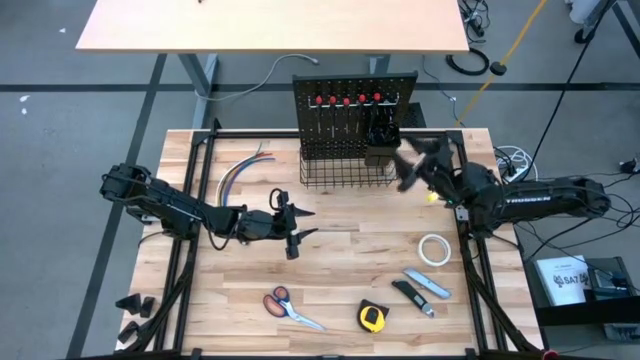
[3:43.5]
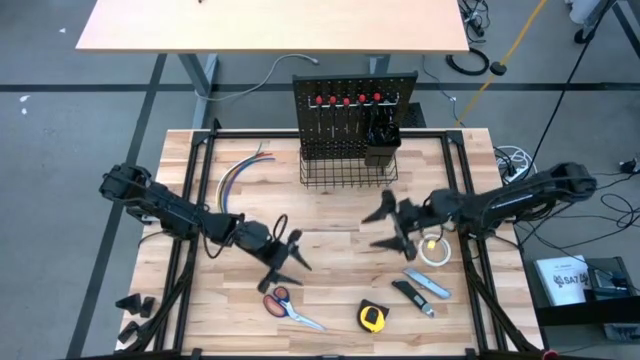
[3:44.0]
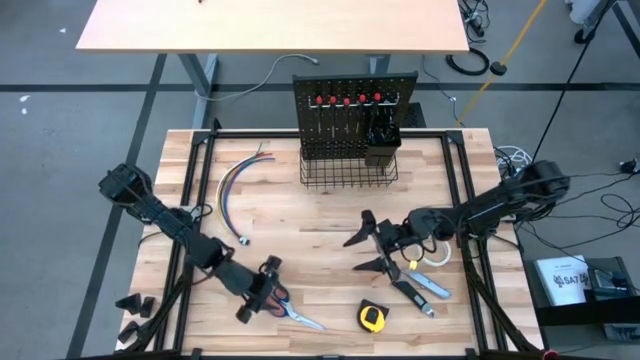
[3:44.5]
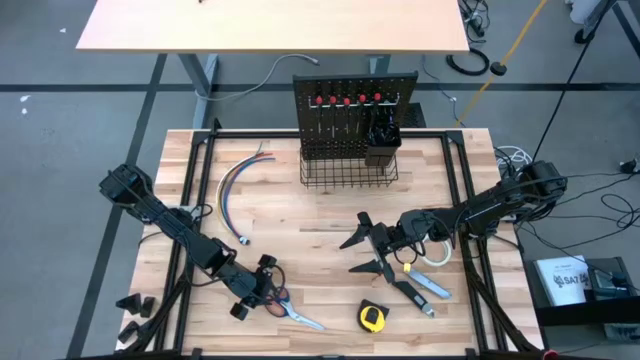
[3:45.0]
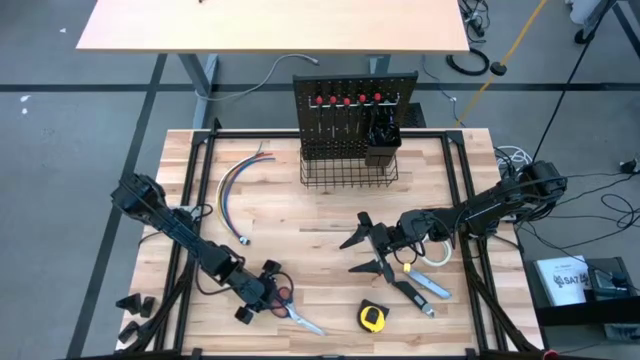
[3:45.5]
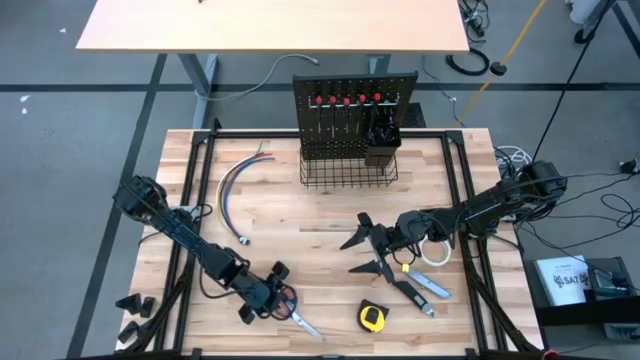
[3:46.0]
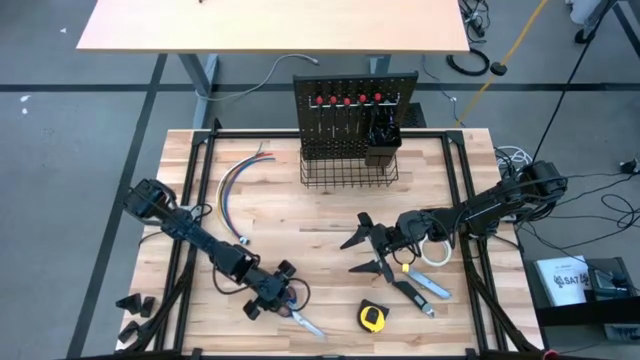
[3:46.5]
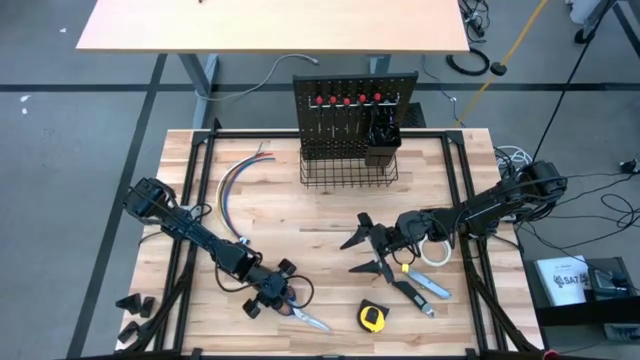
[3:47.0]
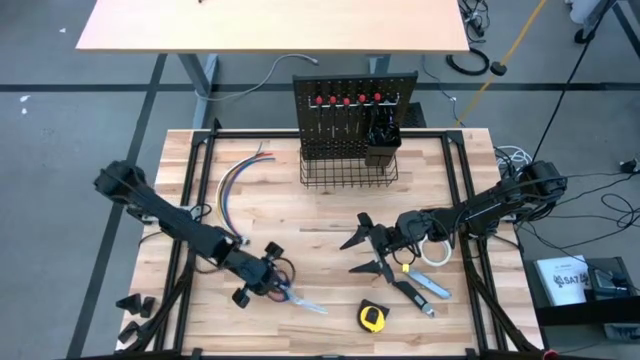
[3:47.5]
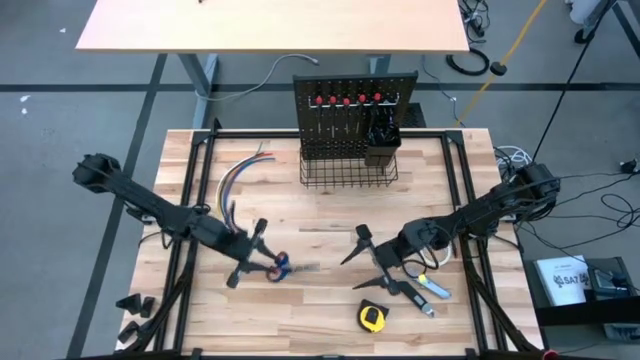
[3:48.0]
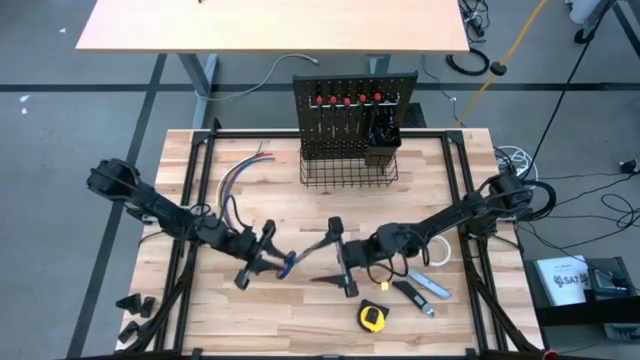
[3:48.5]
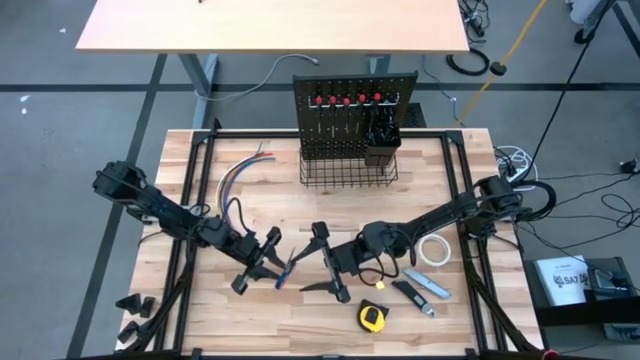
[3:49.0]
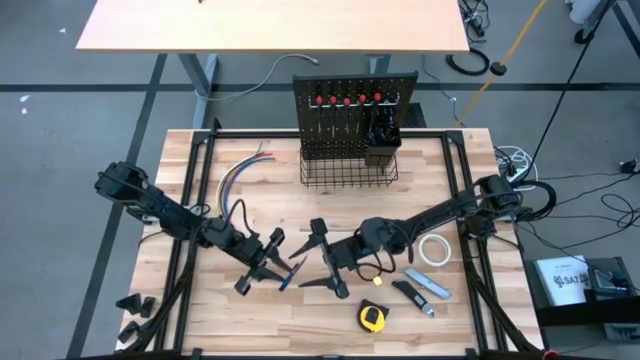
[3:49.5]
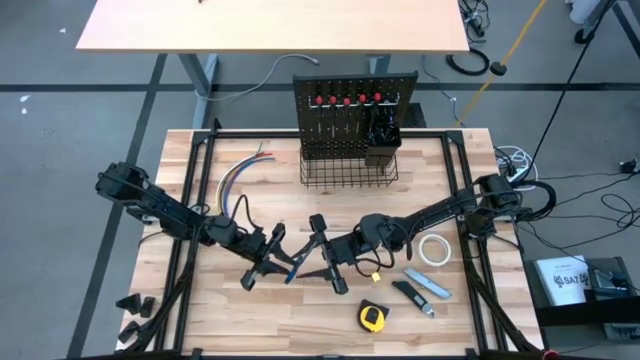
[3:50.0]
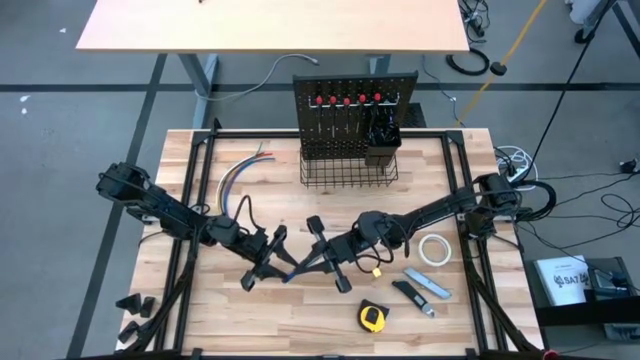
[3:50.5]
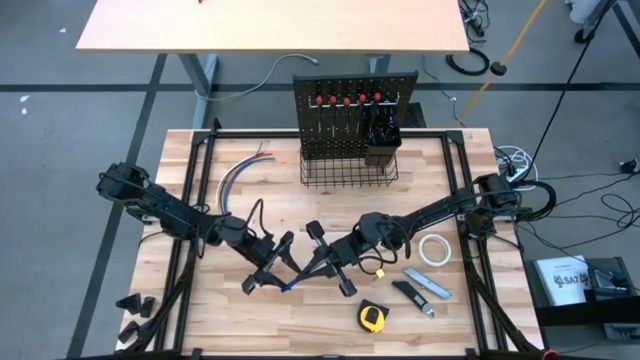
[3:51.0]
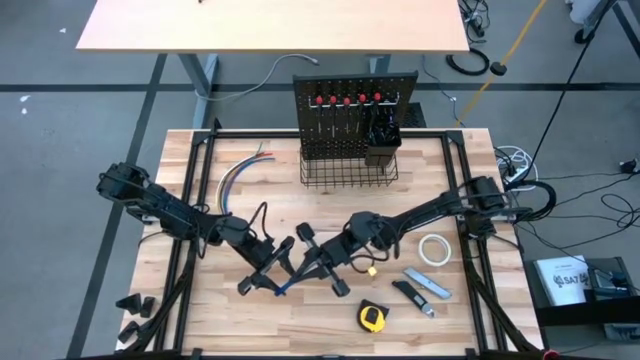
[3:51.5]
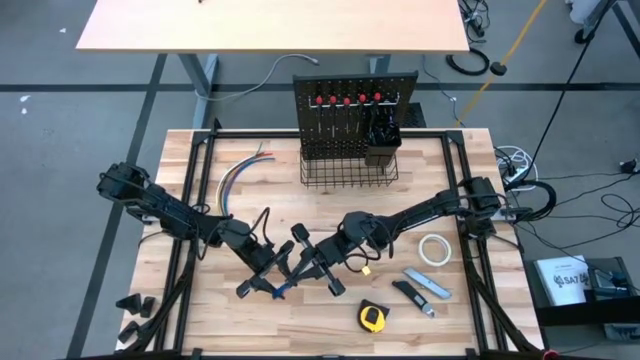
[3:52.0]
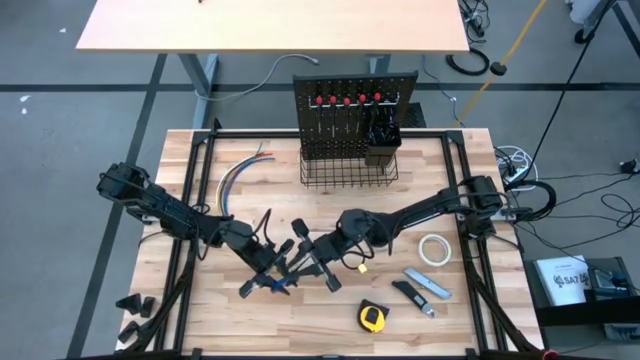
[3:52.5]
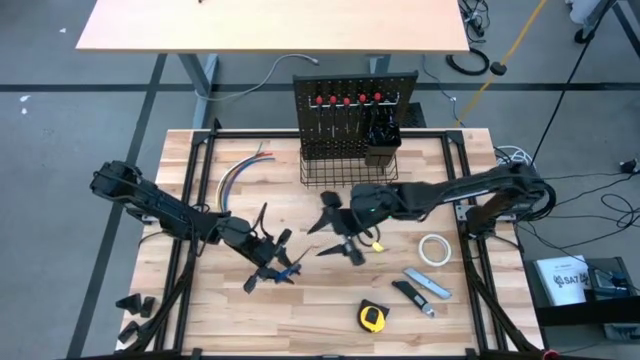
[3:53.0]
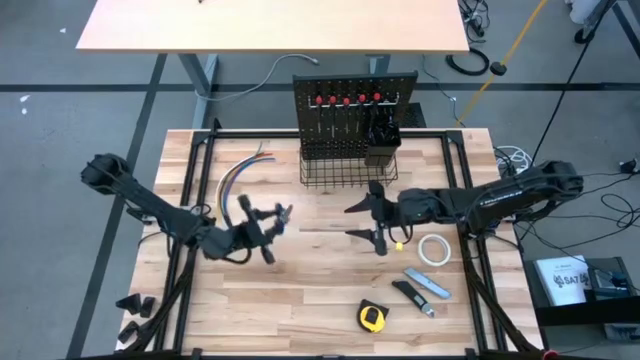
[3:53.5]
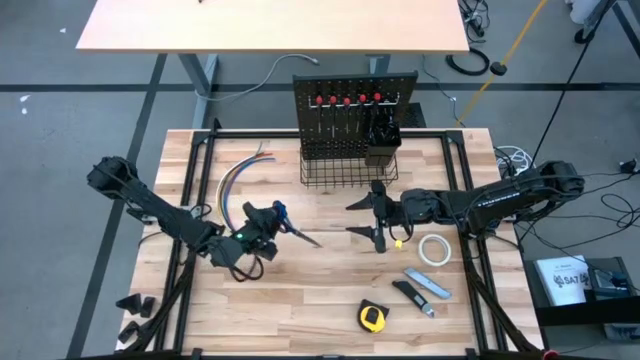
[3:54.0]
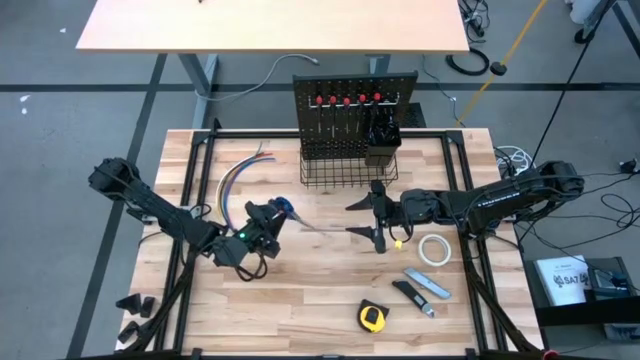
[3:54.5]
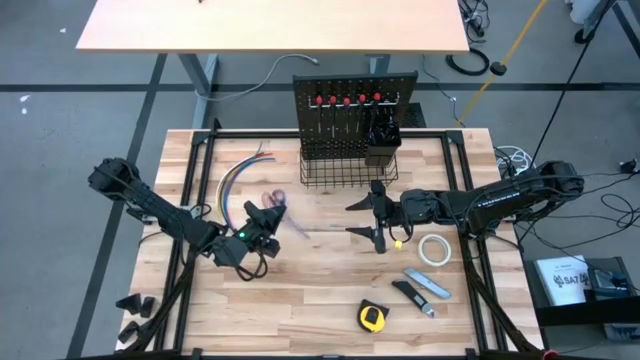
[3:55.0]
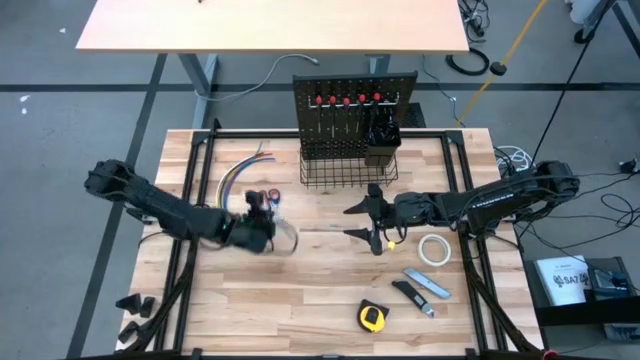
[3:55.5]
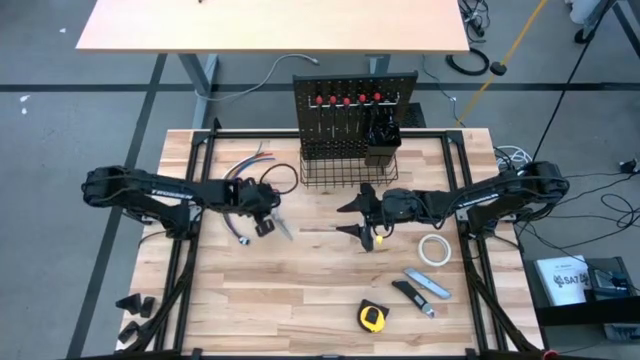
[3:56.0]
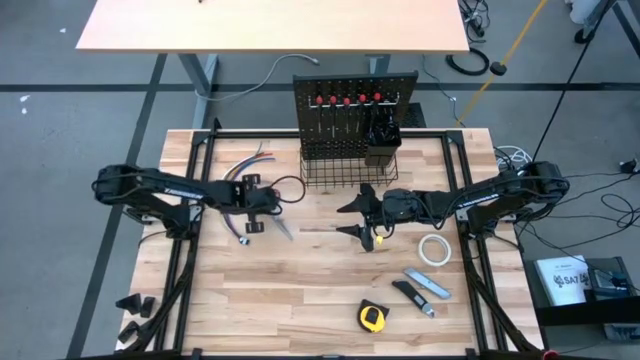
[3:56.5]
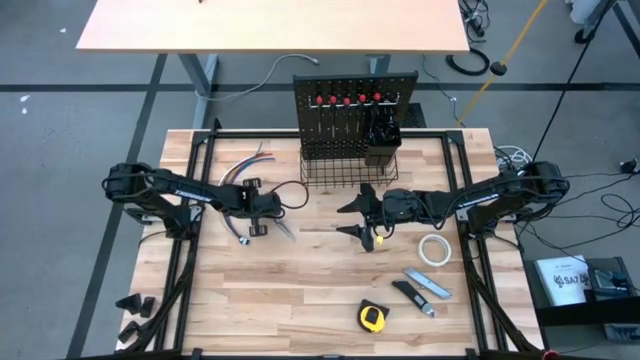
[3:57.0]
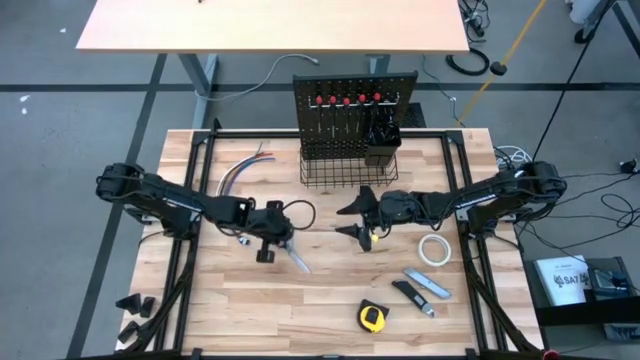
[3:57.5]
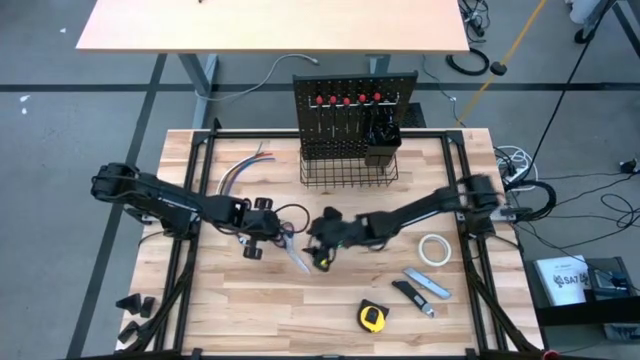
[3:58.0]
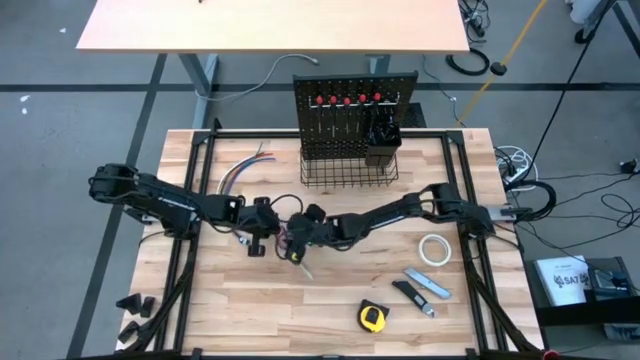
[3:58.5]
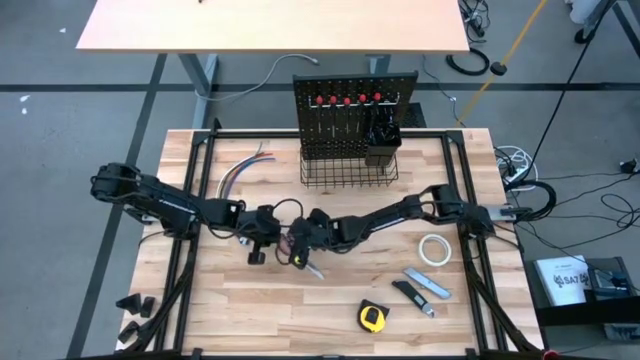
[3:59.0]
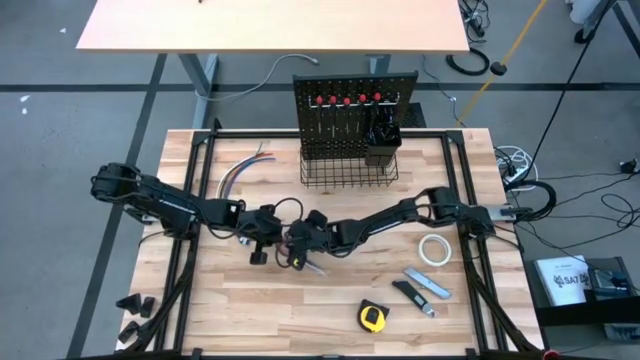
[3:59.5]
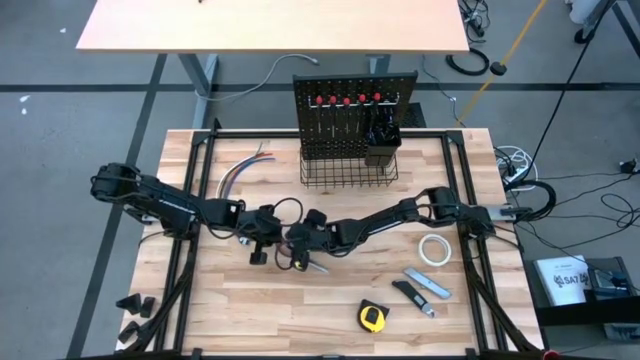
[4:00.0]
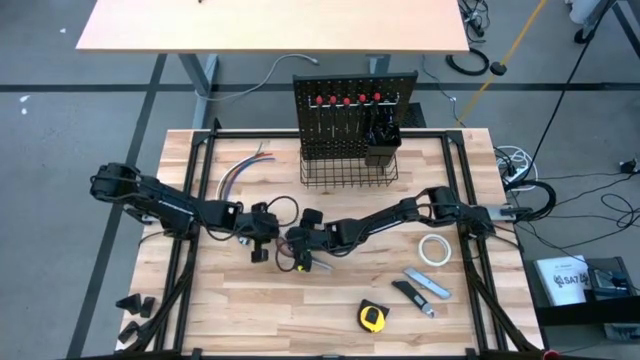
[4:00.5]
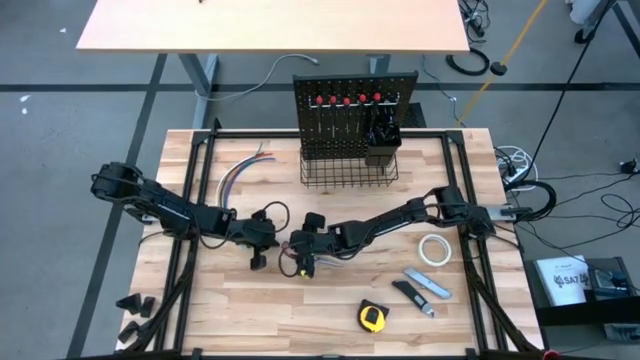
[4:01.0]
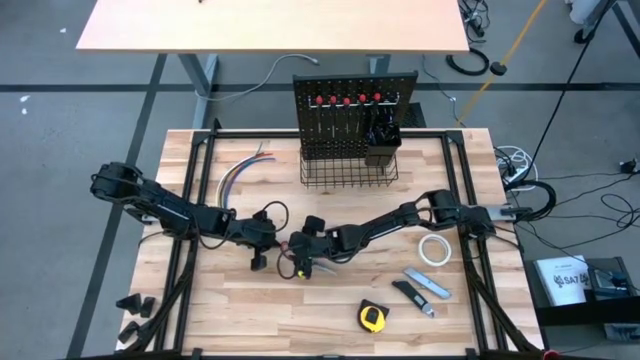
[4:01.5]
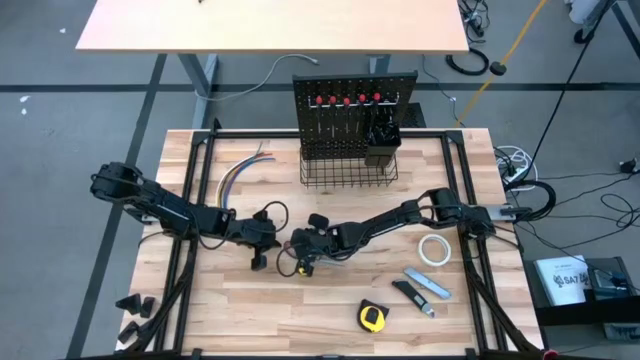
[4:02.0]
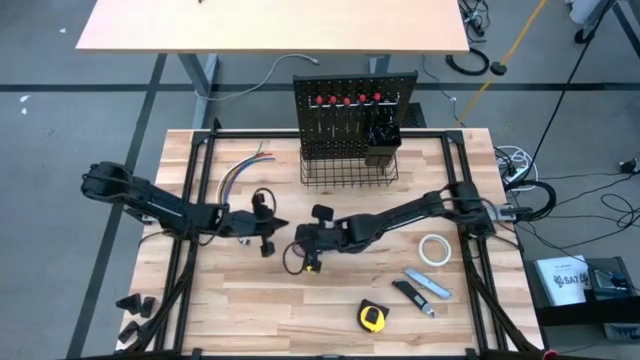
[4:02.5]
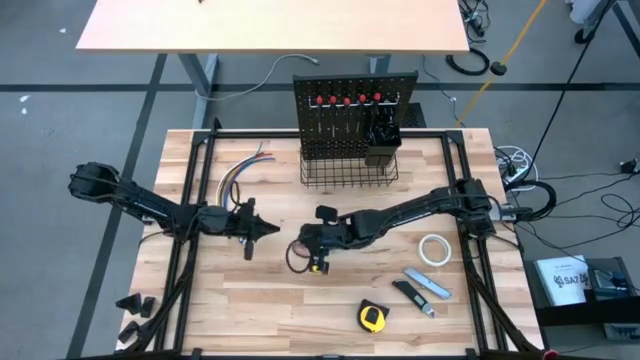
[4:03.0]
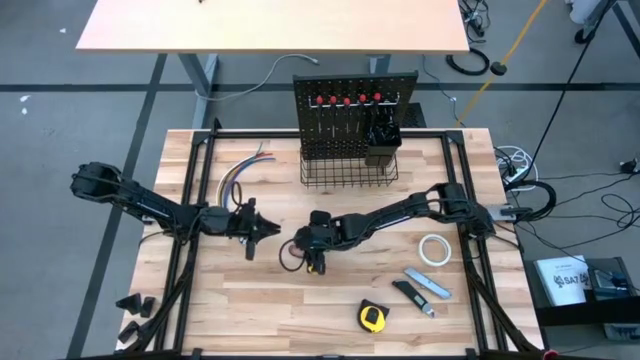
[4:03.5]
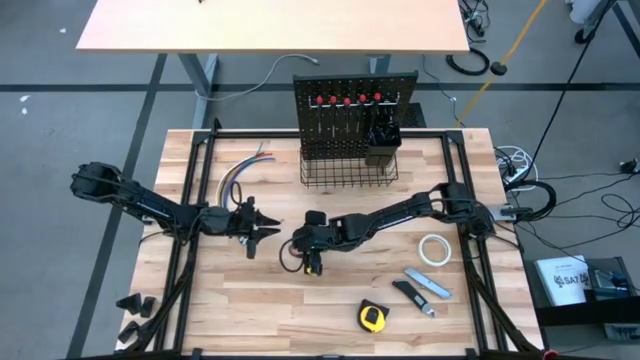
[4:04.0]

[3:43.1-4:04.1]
Task: Hang tools onto peg board
Put the scissor into the black bin on the pegboard
